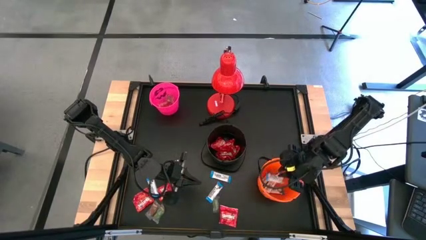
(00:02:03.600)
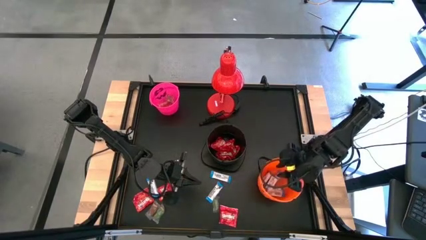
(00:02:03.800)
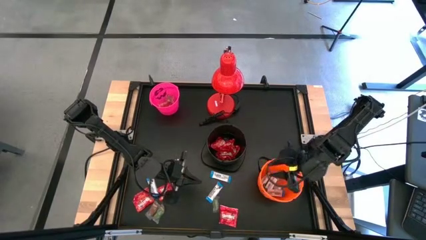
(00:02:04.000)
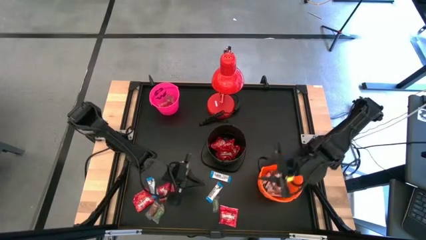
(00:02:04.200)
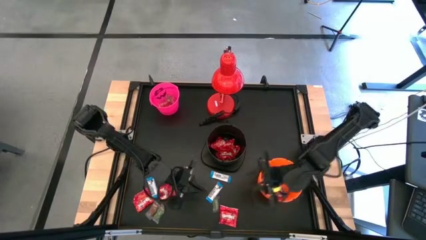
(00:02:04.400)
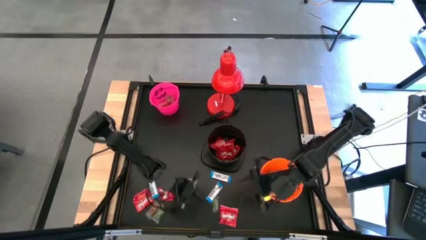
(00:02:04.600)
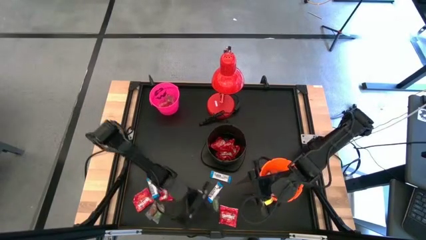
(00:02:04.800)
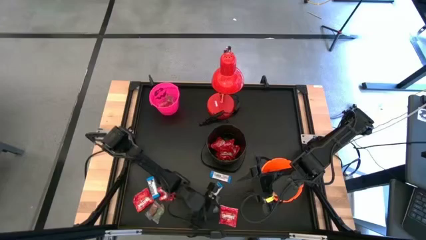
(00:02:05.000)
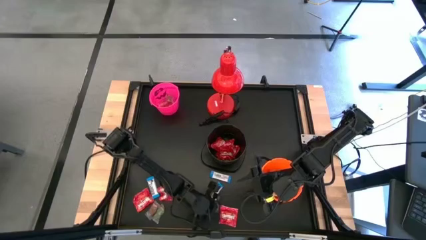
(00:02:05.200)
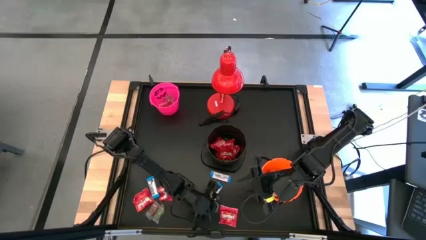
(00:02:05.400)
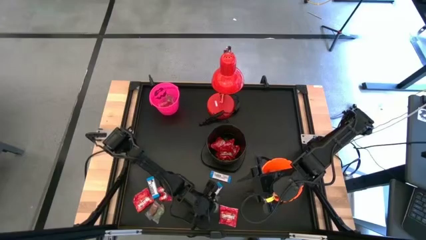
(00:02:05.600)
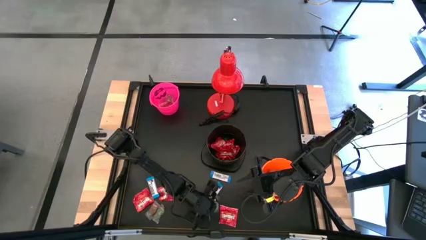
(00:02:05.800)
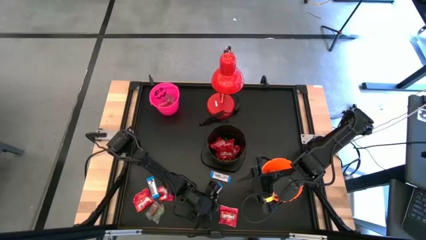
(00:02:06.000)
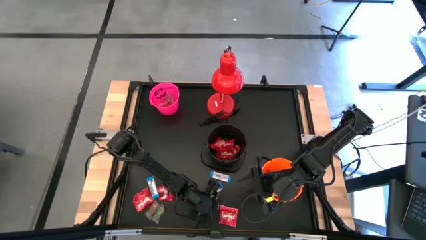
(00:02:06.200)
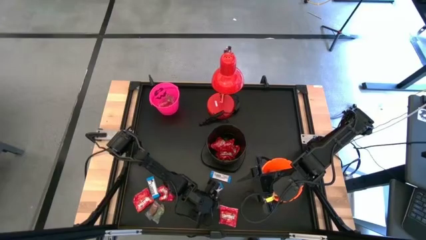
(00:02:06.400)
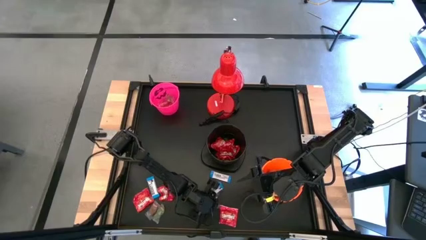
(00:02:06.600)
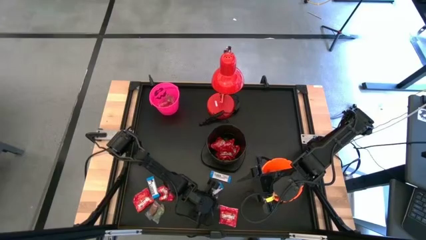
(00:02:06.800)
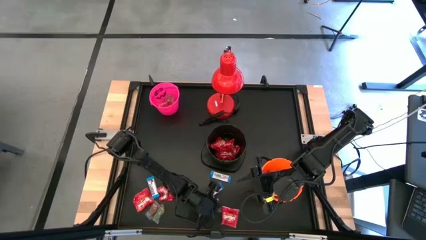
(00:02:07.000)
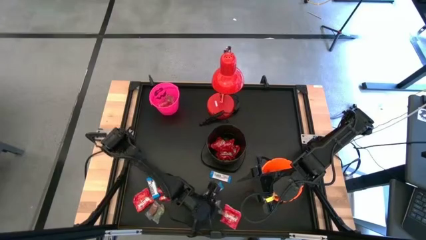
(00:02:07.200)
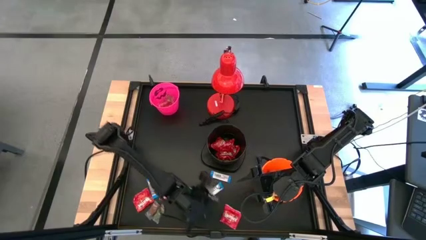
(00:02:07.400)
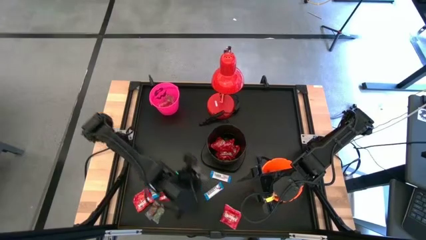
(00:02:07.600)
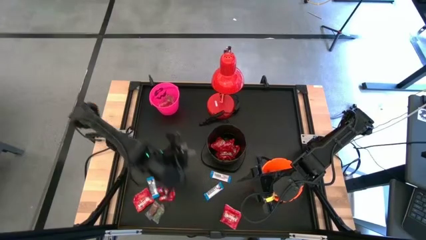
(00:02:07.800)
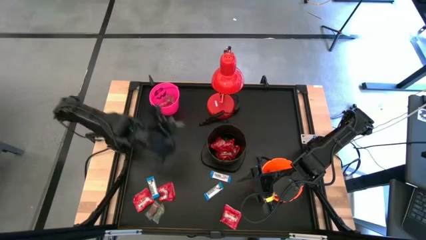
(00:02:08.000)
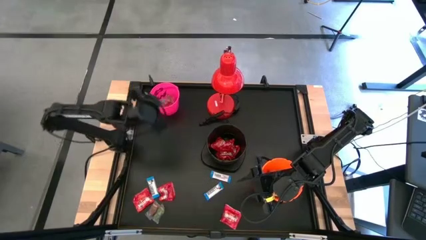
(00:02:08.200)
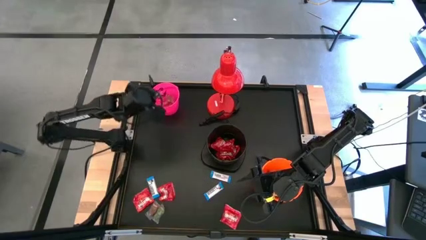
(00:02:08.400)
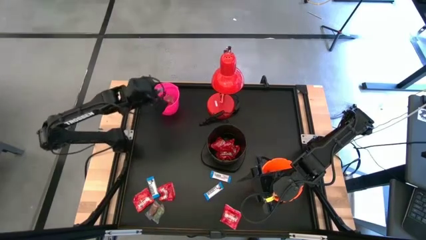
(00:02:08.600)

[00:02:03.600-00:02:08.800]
Task: Organize candy in baskets
Put the green gummy into the pink bucket

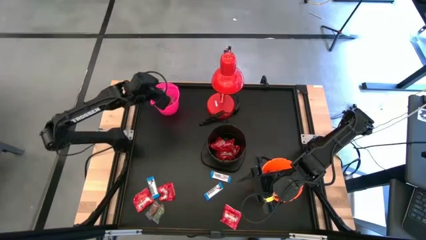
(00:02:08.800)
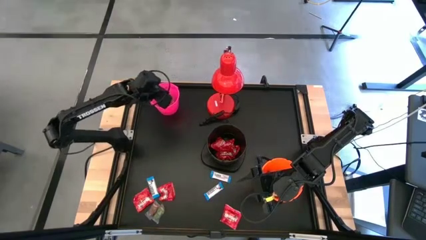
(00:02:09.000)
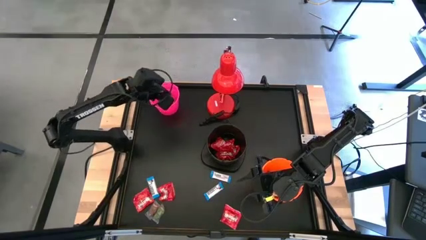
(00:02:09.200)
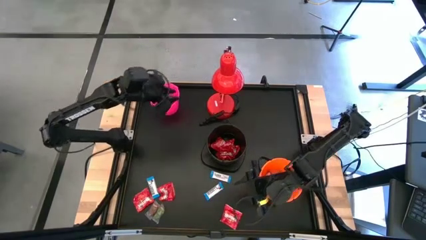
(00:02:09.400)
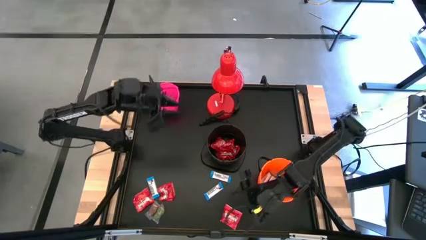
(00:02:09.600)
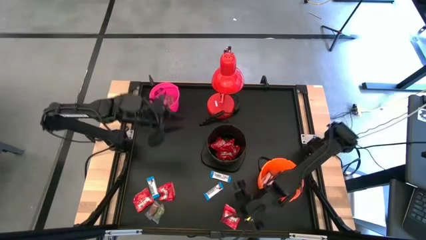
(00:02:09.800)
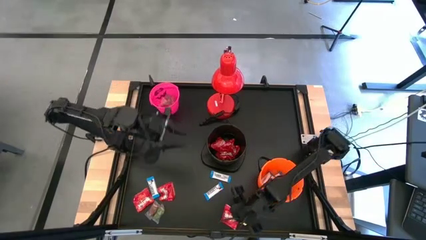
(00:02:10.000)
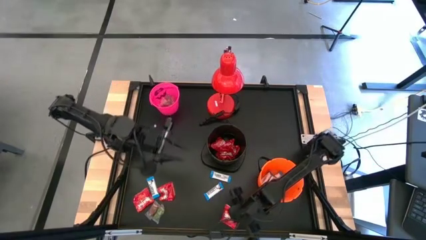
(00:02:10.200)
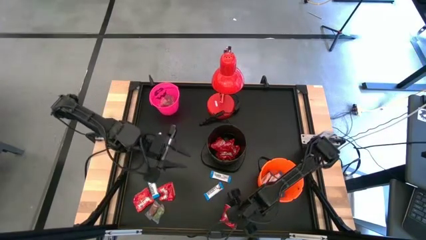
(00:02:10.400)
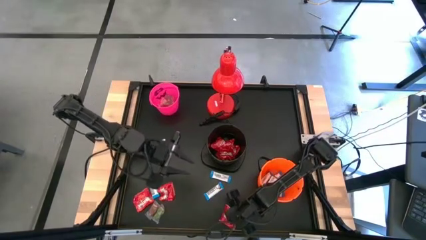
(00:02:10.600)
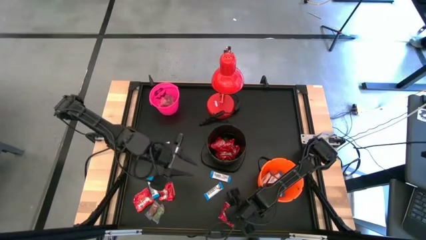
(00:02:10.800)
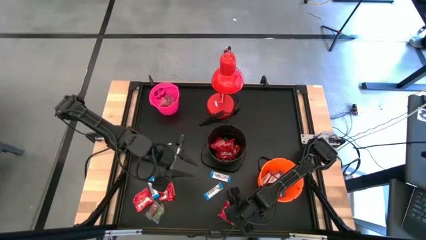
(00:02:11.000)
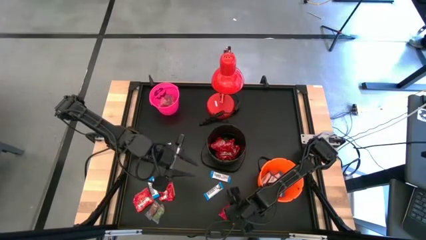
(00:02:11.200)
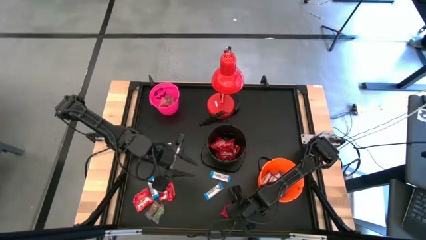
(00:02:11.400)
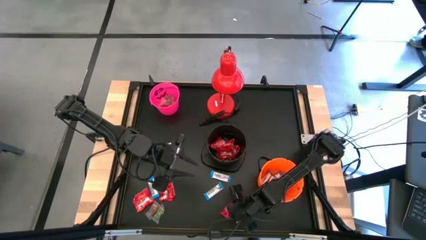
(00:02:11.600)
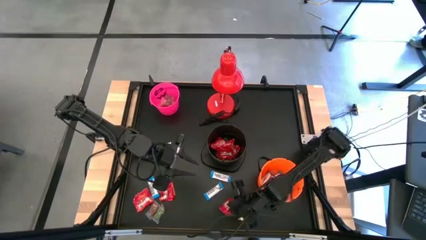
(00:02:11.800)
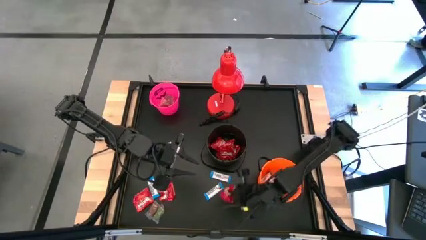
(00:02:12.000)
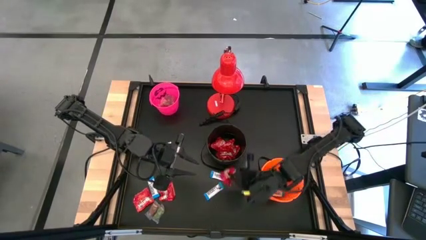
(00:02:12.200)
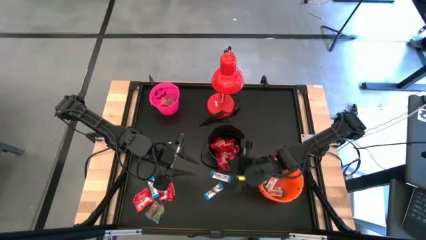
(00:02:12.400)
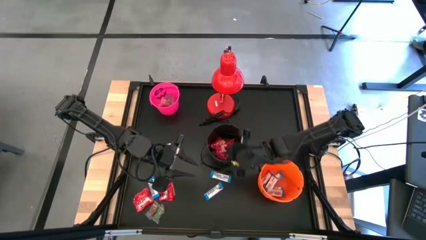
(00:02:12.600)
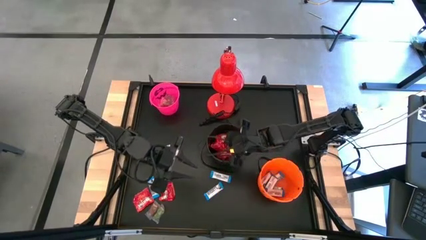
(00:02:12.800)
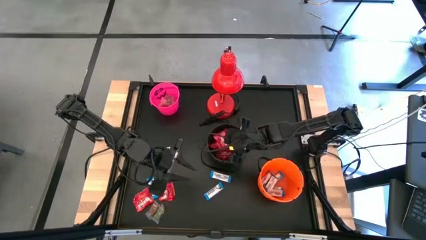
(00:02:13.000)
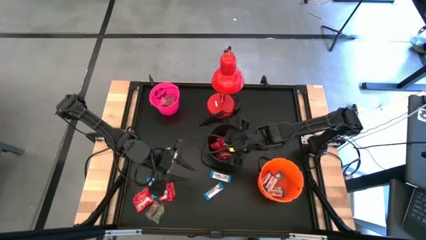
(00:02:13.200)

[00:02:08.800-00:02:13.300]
Put the red candy into the black bucket

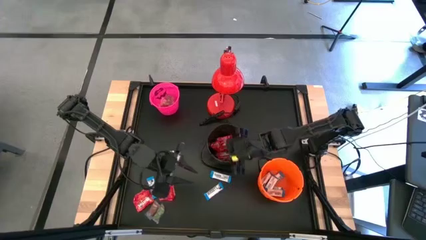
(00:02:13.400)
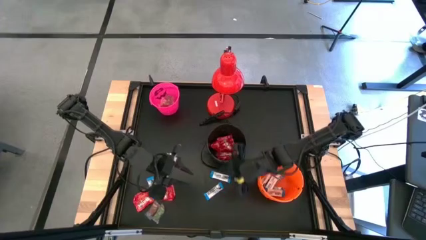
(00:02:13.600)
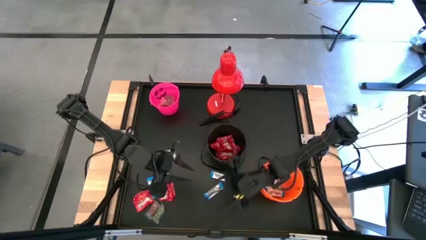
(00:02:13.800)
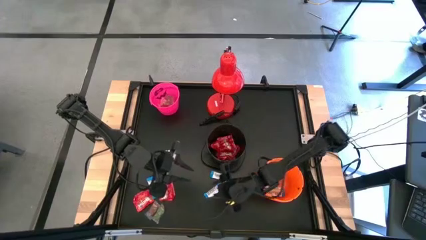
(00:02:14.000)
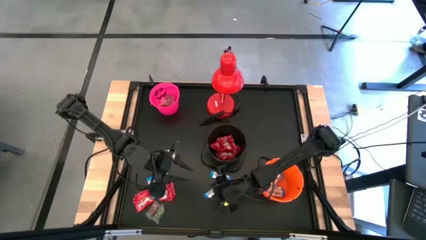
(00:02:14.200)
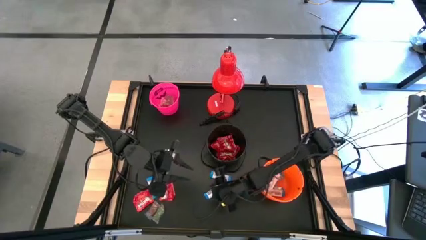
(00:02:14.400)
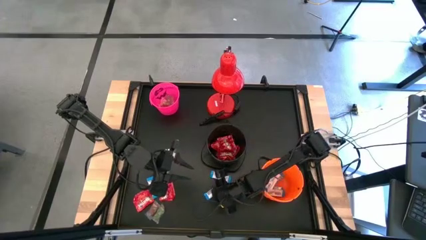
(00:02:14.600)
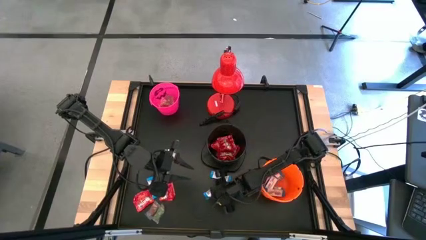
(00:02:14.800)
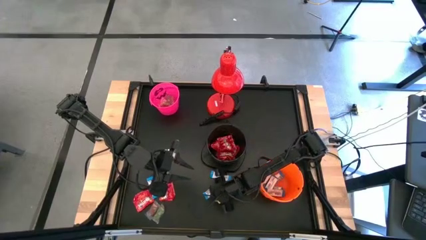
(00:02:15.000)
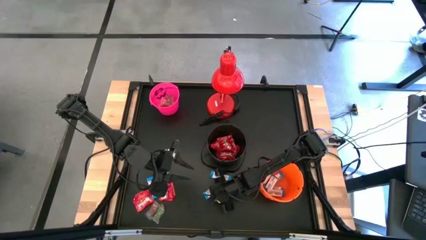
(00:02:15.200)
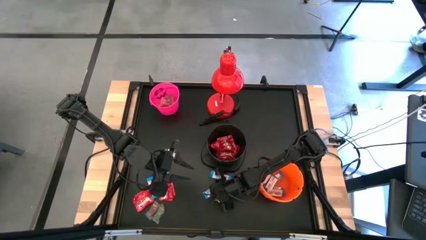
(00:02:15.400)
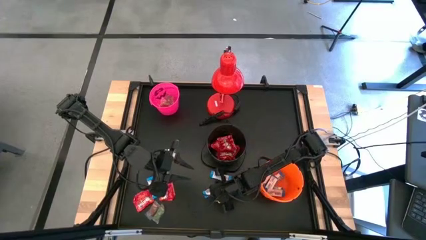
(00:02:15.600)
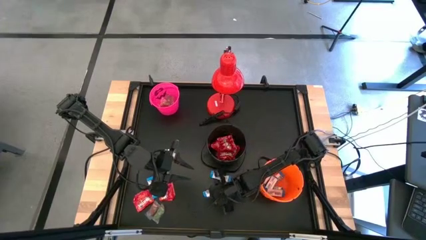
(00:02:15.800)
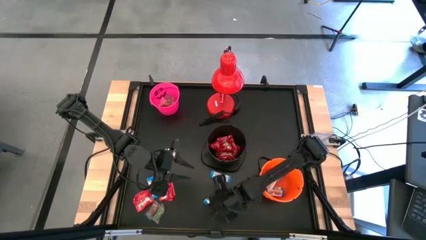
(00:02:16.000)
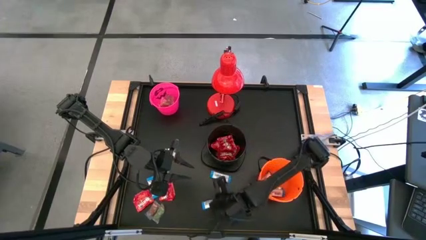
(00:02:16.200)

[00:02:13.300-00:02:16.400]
Put the white chocolate into the orange bucket

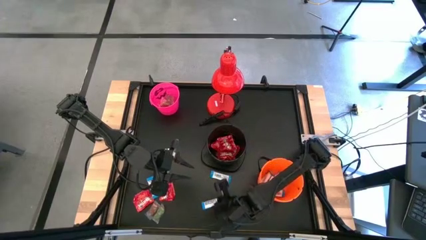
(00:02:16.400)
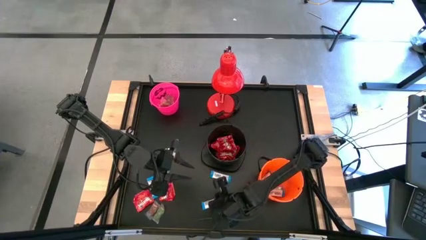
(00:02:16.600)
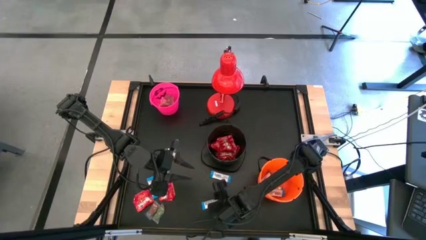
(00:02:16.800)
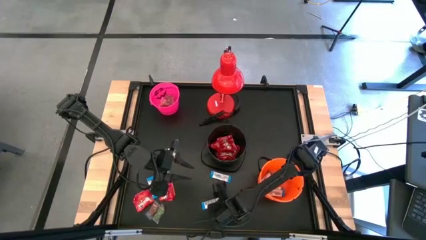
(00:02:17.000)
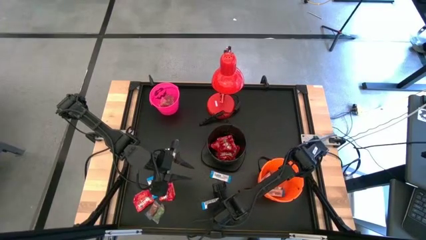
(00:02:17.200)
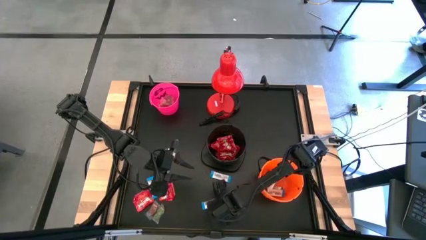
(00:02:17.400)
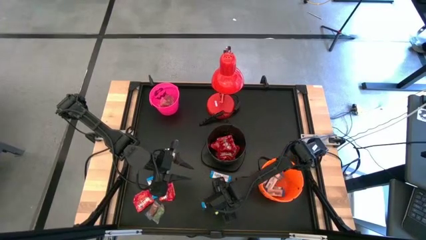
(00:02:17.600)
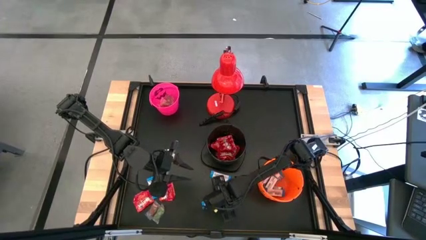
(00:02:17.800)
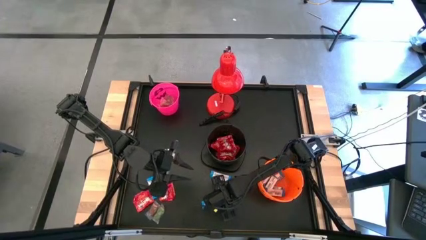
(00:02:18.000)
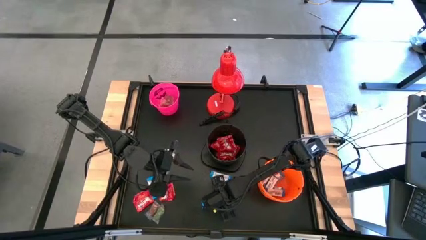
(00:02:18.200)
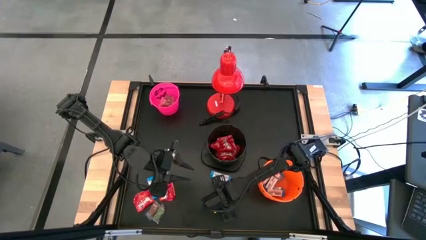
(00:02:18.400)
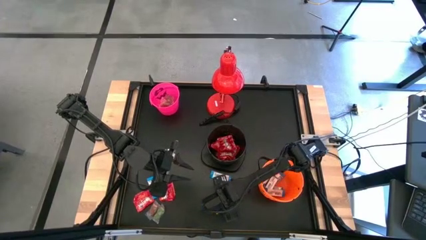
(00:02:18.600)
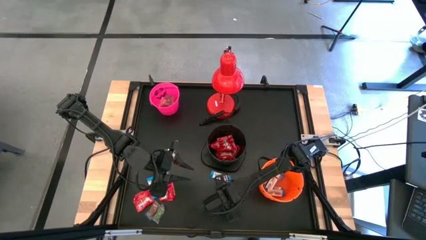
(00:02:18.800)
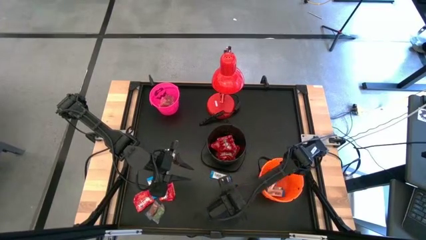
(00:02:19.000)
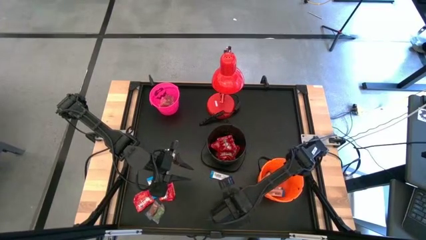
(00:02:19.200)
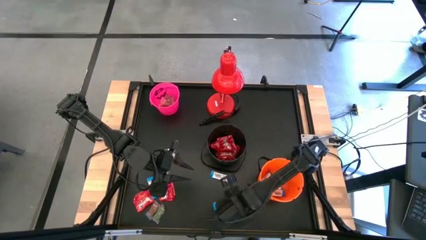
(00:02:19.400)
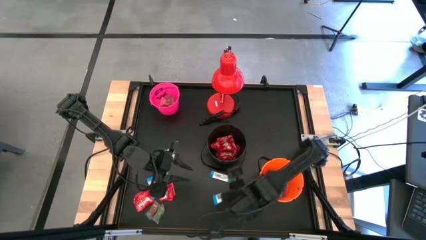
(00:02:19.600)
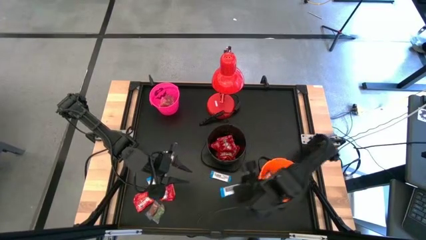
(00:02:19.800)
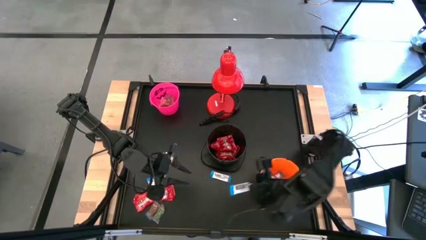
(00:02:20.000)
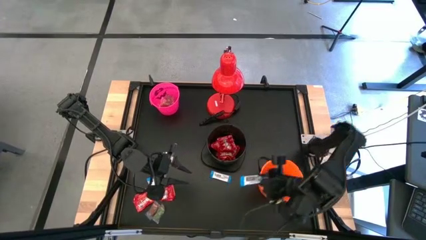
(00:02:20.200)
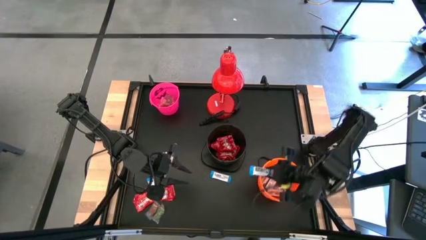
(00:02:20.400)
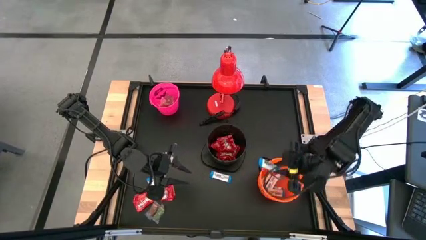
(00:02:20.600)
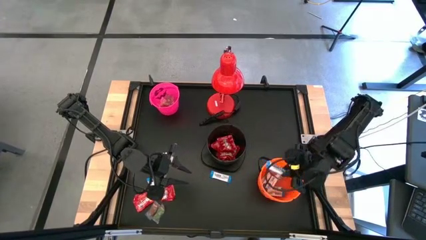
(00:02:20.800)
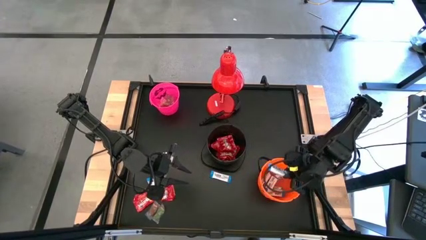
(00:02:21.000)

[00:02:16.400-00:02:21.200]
Put the white chocolate into the orange bucket
